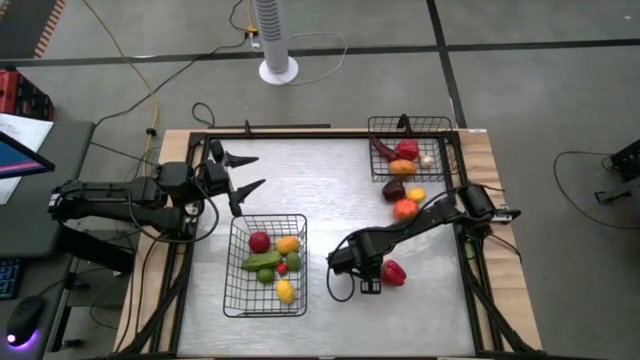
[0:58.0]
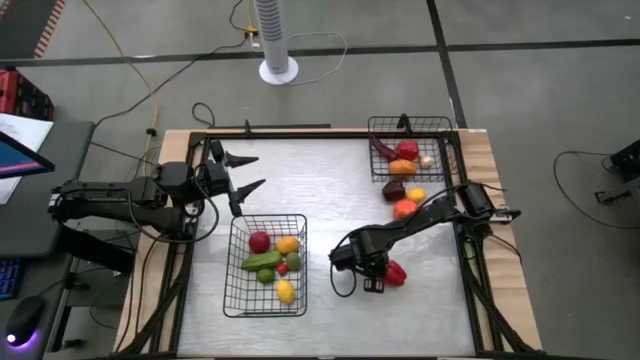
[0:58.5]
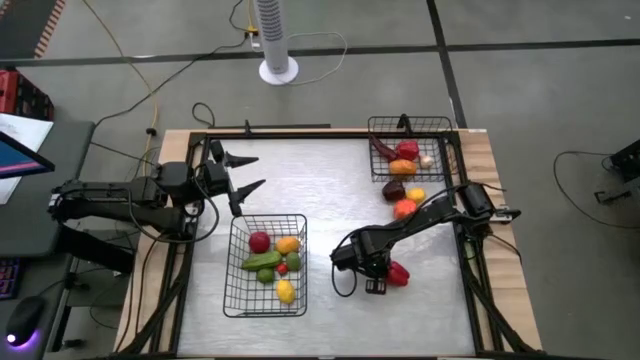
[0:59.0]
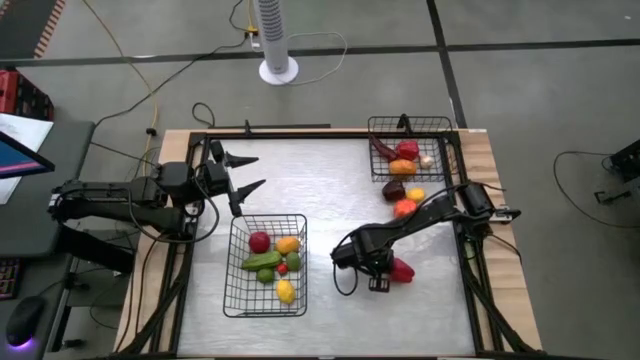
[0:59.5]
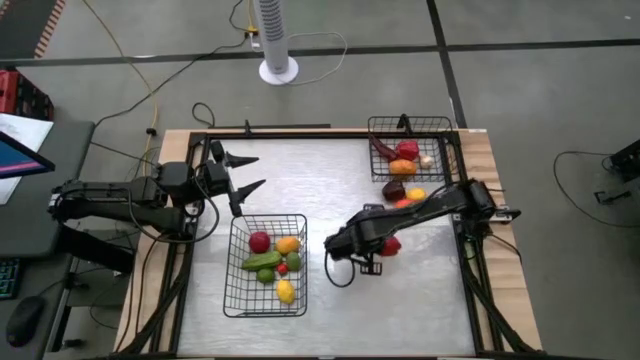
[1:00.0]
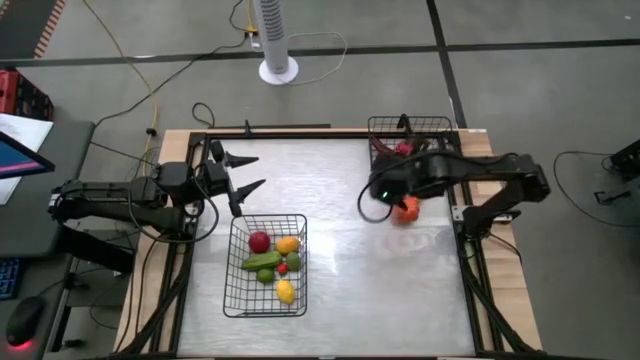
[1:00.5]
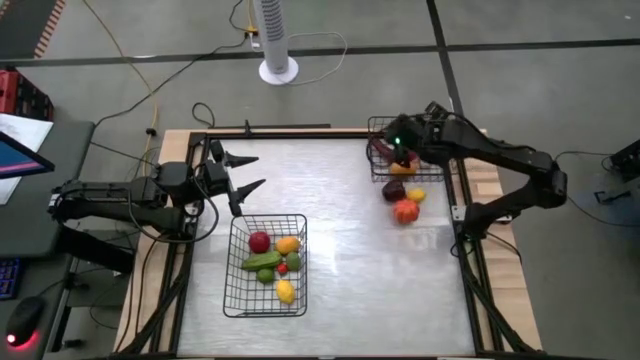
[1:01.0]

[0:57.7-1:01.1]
Task: Sort produce into baskets
Put the bell pepper into the top wire basket

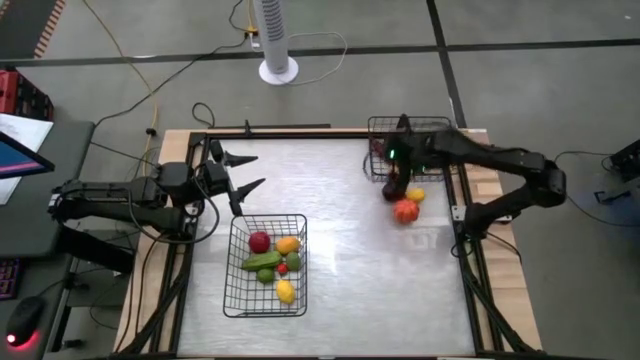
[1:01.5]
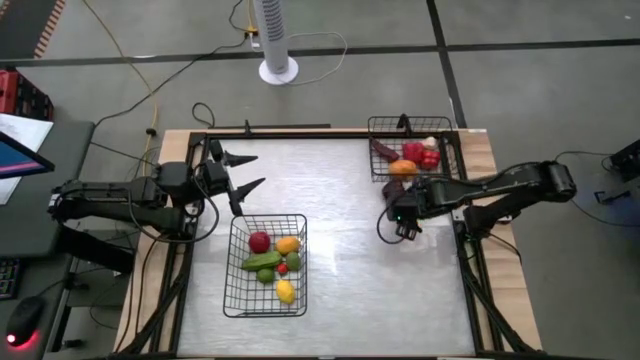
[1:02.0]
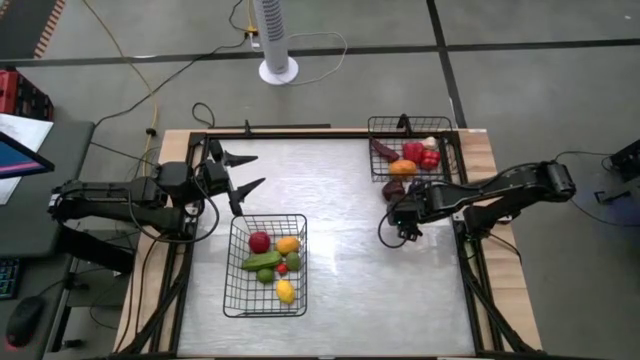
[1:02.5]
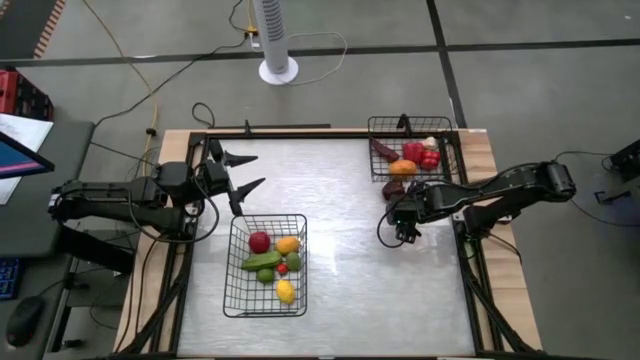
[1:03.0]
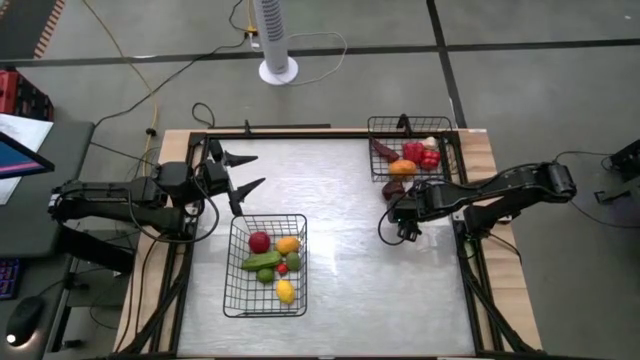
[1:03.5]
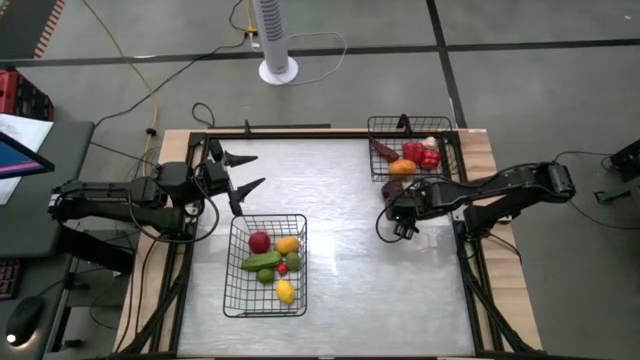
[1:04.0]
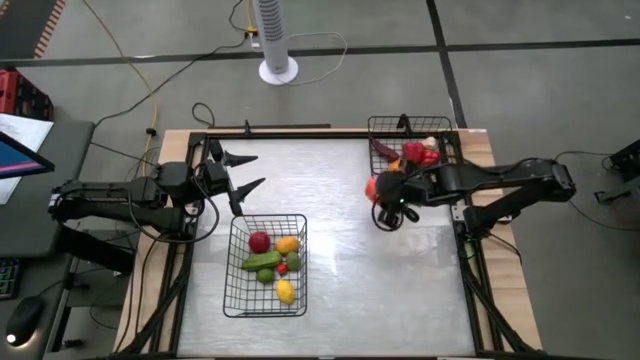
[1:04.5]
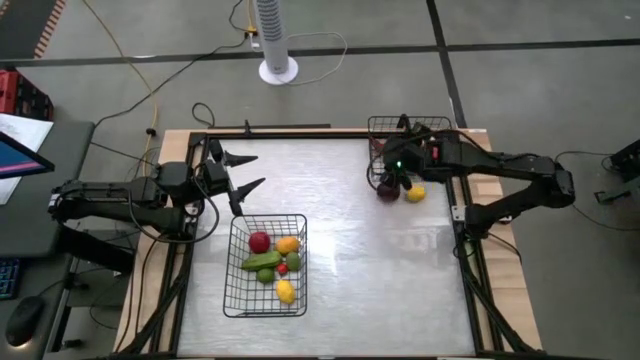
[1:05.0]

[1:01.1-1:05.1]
Put the pumpkin into the top wire basket

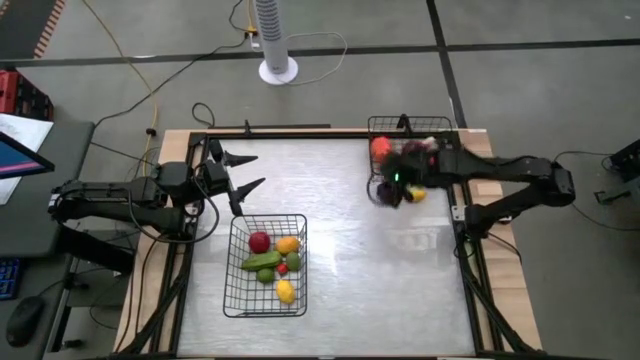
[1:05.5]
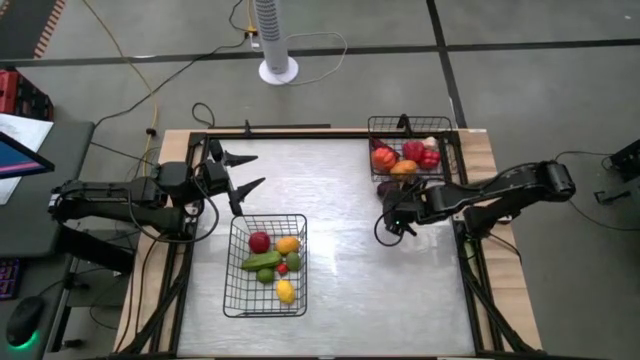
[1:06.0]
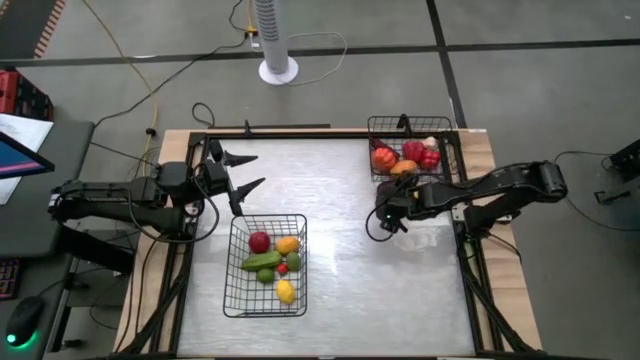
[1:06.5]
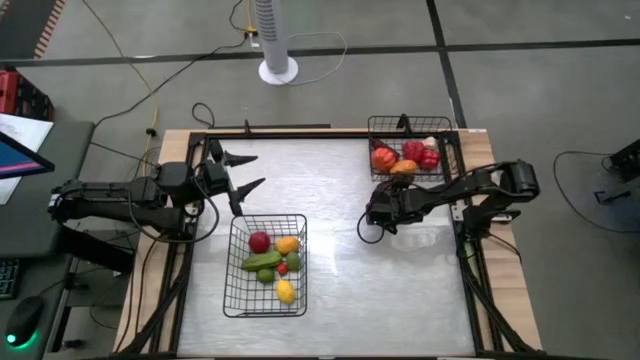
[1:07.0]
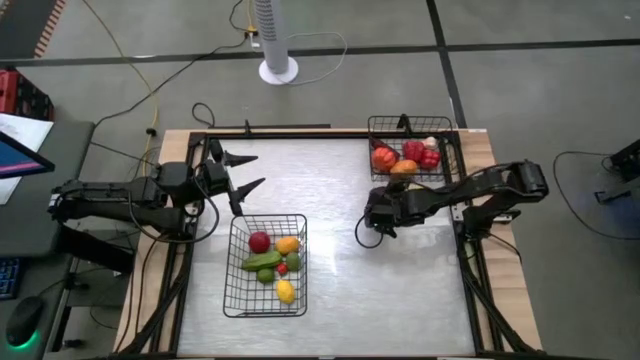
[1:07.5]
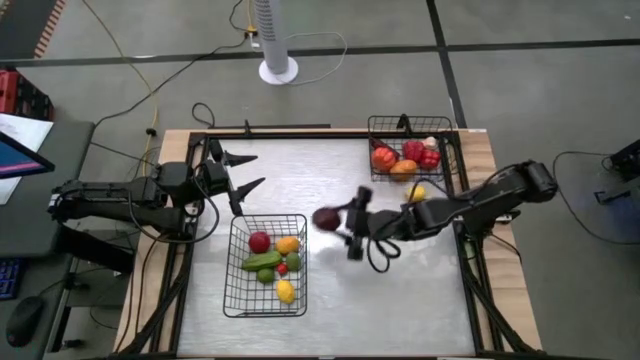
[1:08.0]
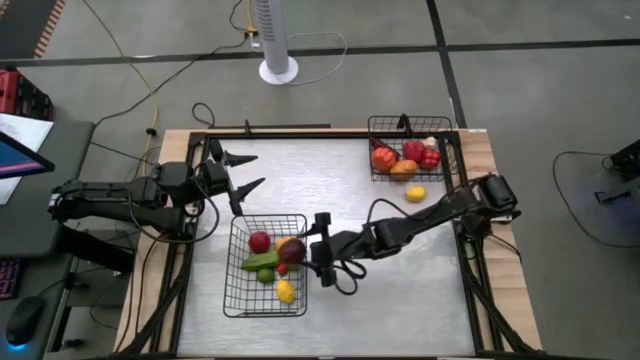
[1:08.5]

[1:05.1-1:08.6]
Put the apple into the bottom wire basket

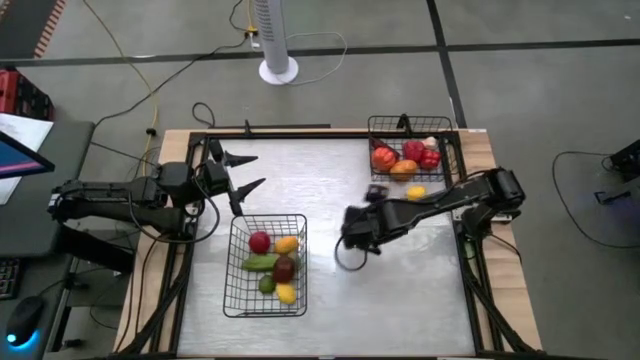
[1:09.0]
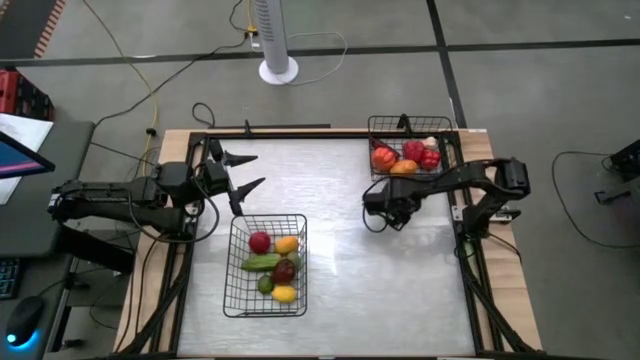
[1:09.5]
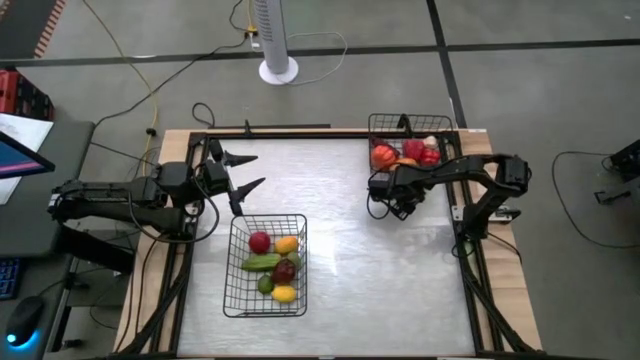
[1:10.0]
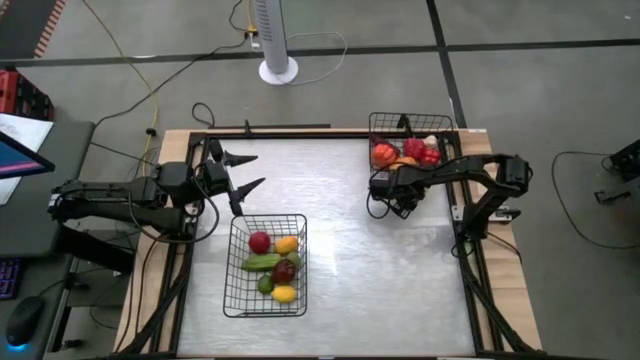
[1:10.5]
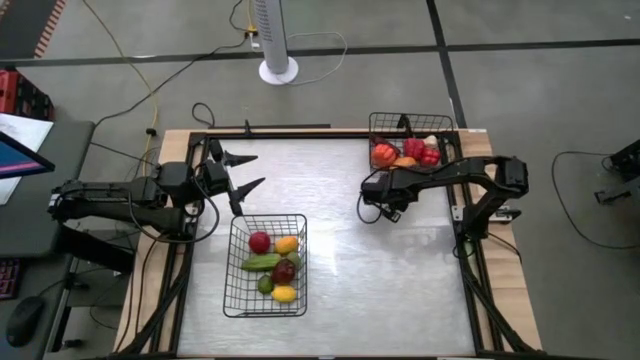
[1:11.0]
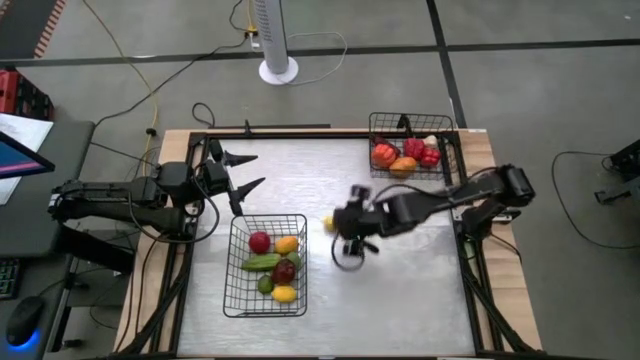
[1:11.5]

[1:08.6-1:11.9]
Put the lemon into the bottom wire basket

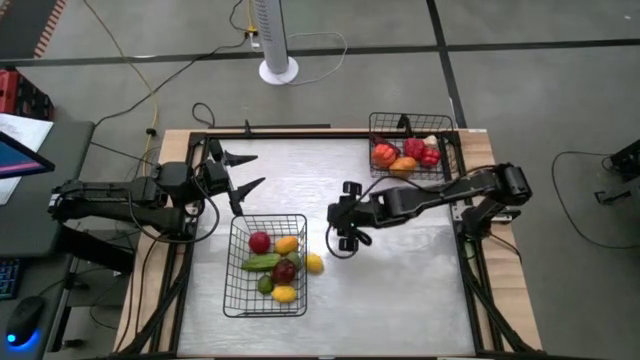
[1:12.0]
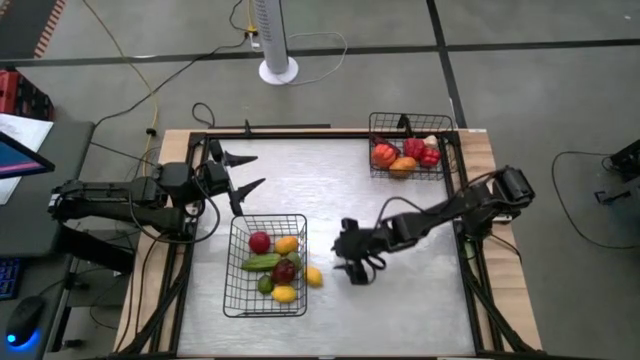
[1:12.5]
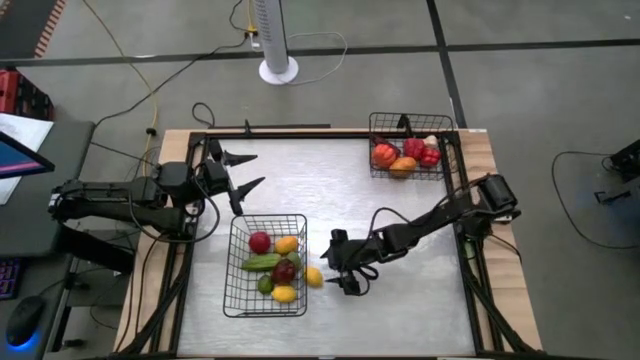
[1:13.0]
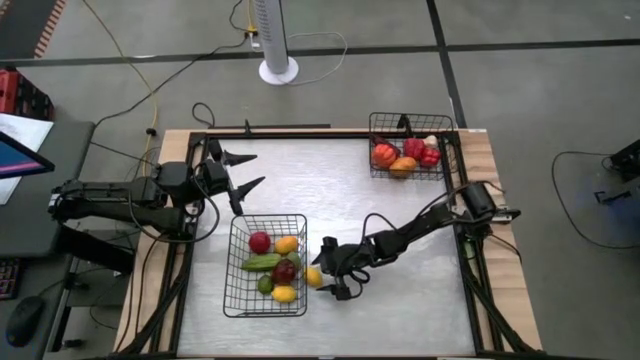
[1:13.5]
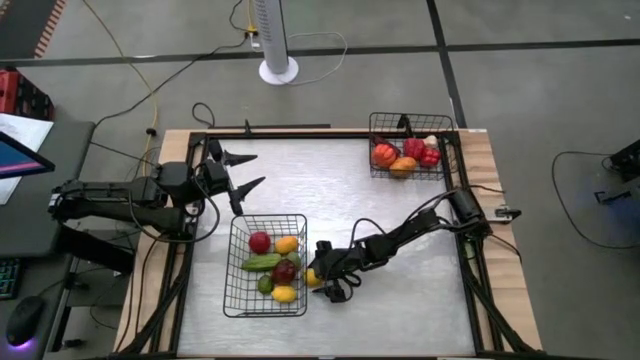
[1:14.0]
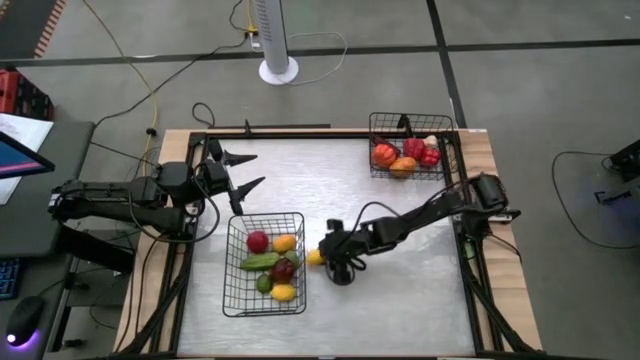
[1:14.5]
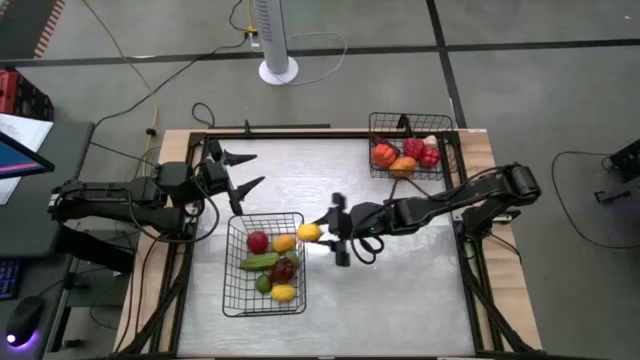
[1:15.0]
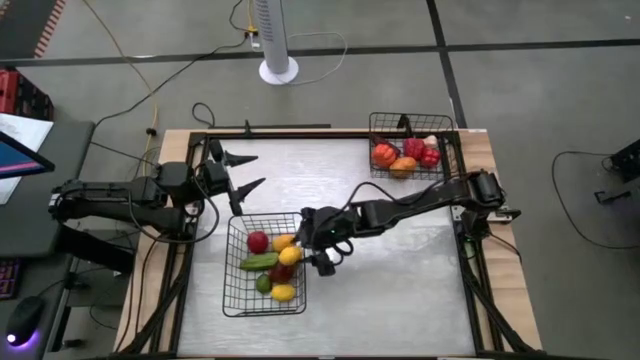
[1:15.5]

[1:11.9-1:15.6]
Put the lemon into the bottom wire basket

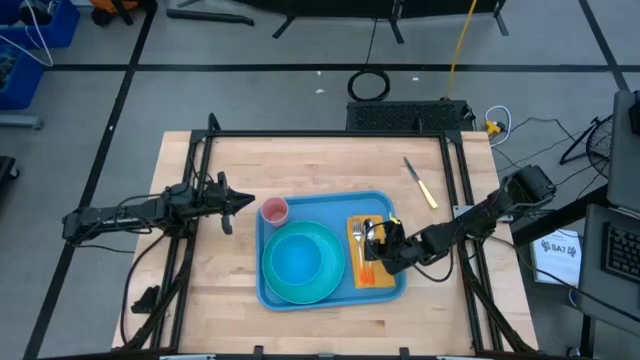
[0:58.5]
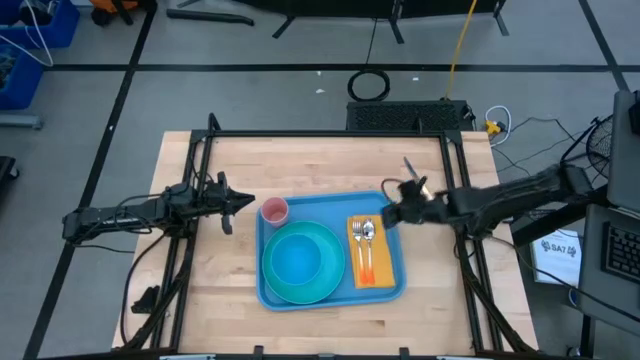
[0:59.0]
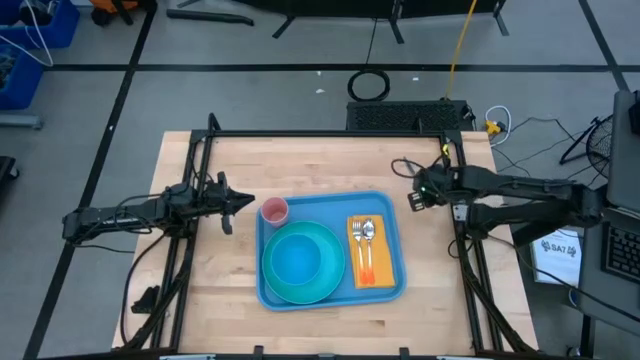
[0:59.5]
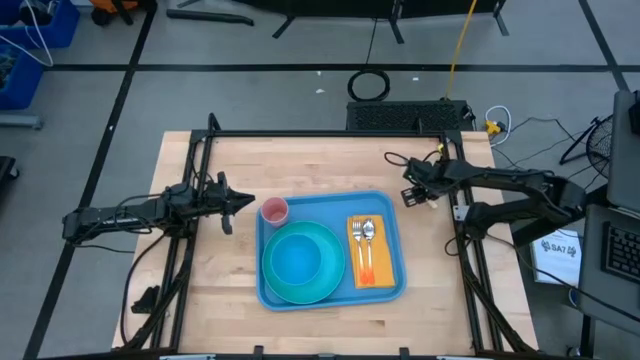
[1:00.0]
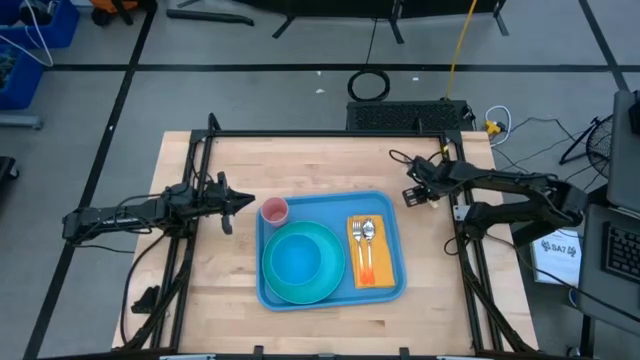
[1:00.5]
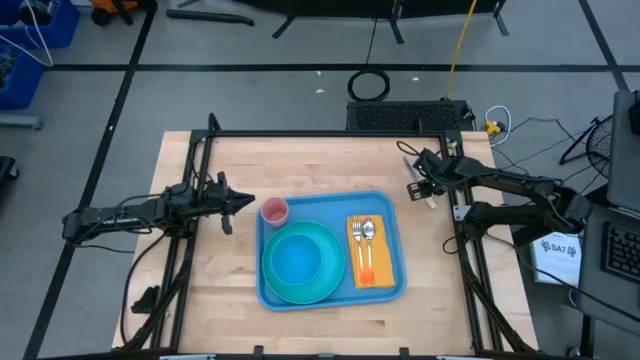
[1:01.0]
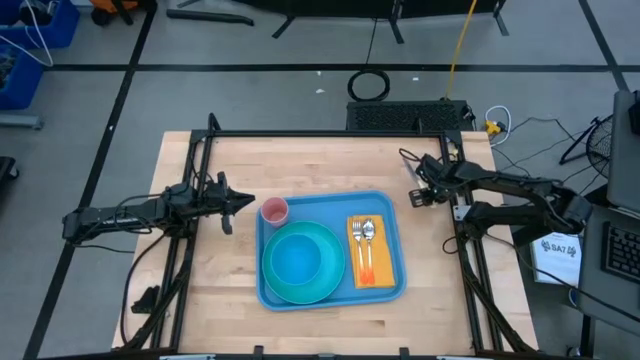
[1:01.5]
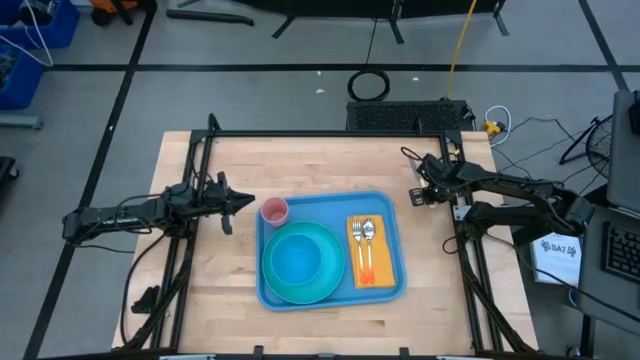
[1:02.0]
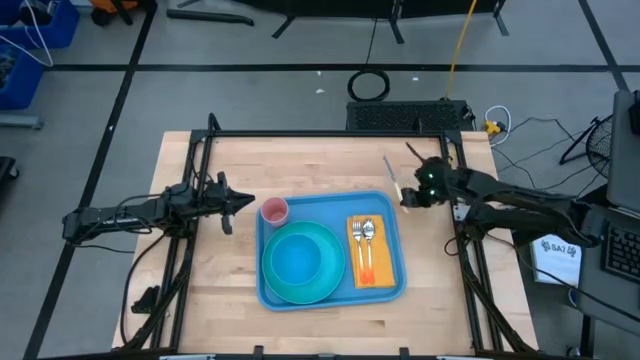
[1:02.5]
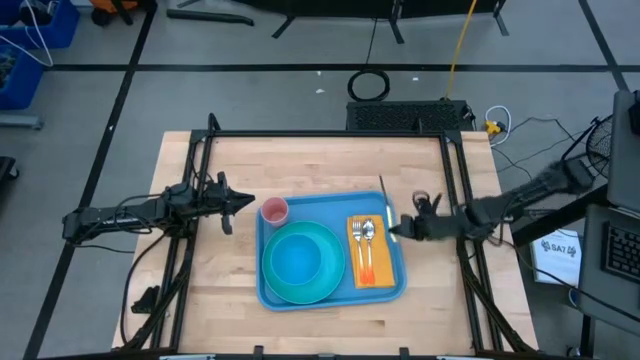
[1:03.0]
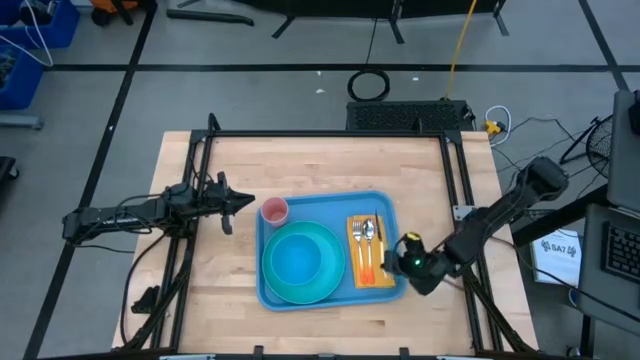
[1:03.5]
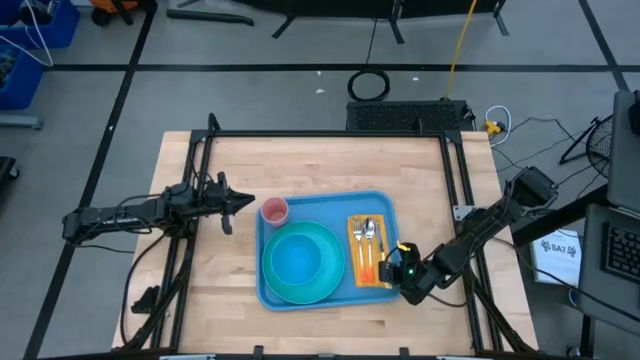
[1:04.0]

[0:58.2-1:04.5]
Task: Set up tray
Put the light yellow knife on the yellow napkin to the right of the orange spoon
